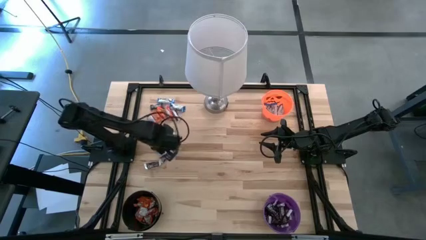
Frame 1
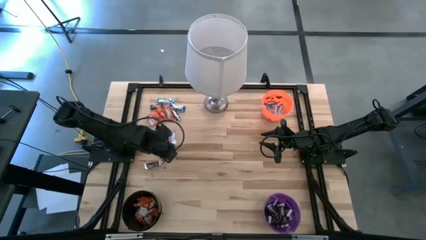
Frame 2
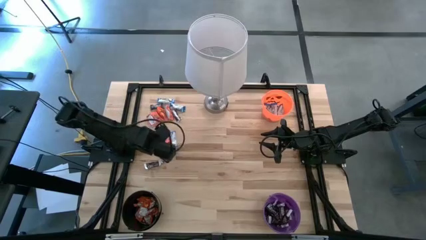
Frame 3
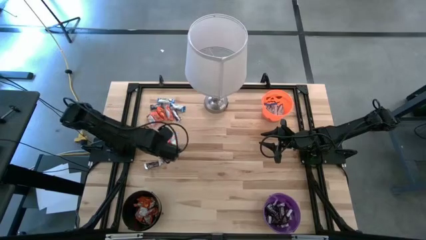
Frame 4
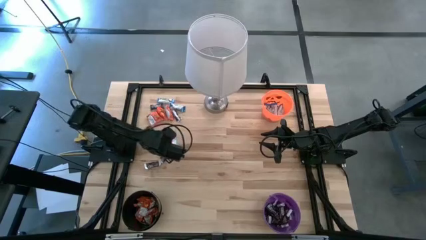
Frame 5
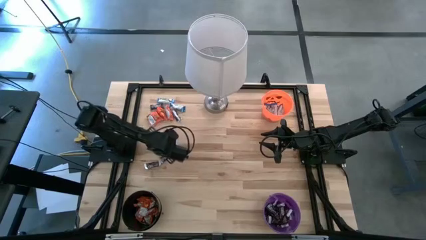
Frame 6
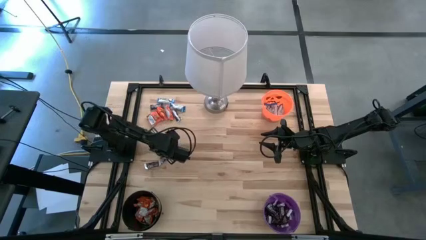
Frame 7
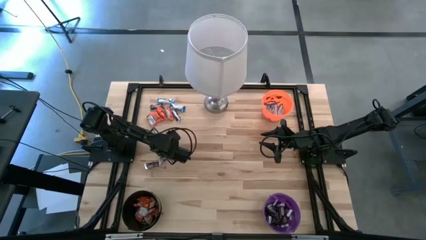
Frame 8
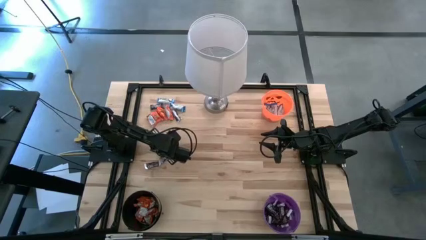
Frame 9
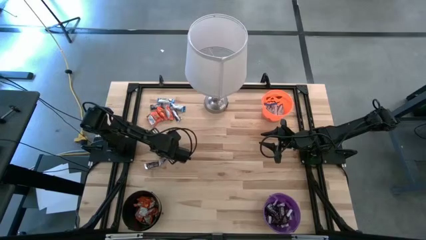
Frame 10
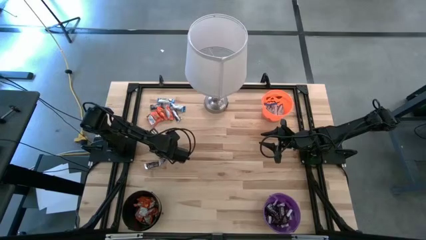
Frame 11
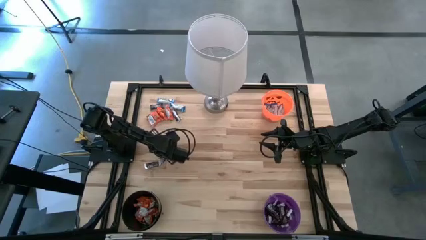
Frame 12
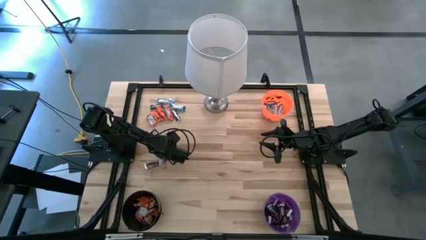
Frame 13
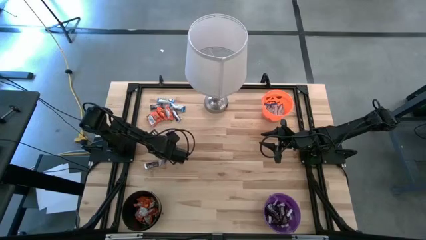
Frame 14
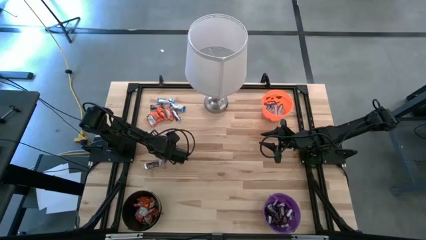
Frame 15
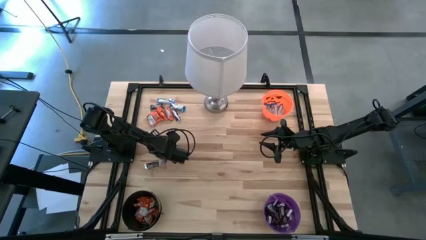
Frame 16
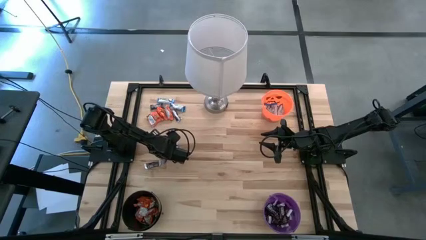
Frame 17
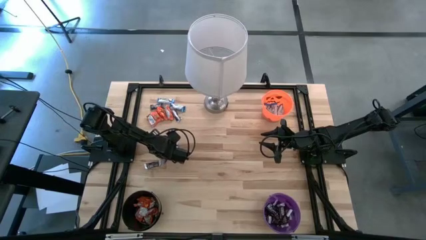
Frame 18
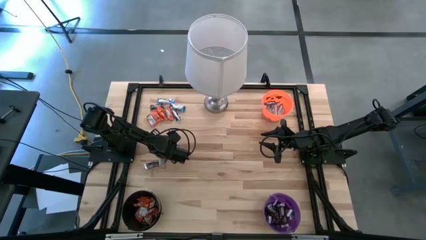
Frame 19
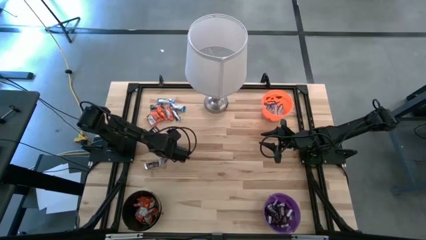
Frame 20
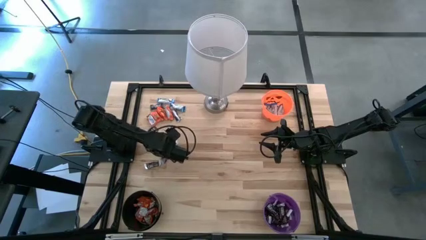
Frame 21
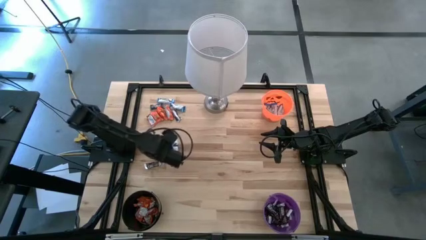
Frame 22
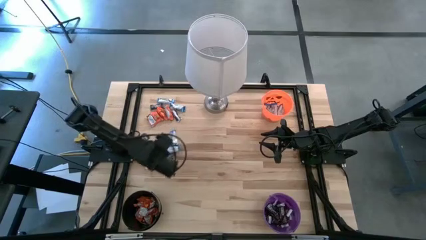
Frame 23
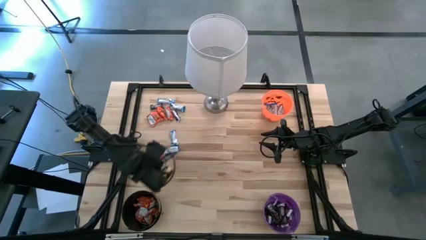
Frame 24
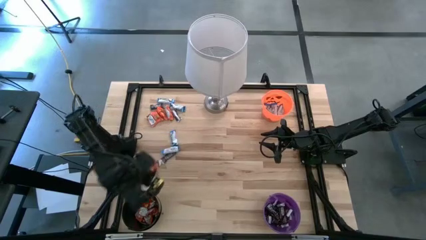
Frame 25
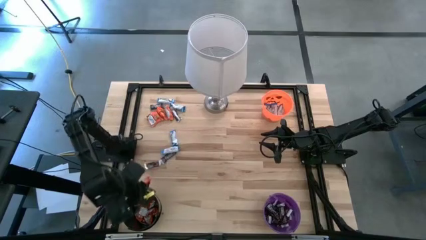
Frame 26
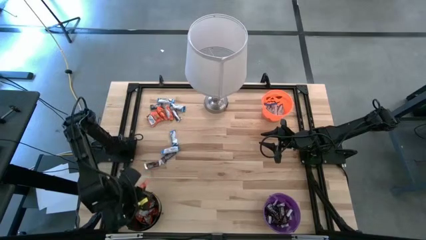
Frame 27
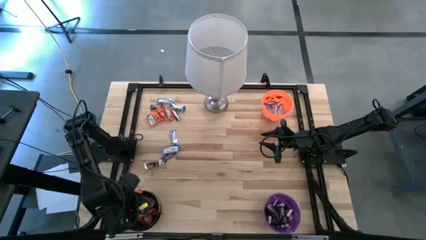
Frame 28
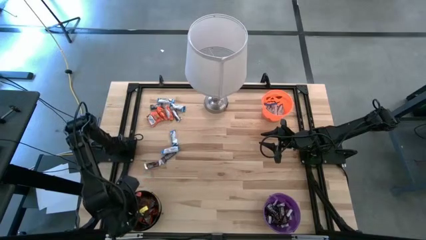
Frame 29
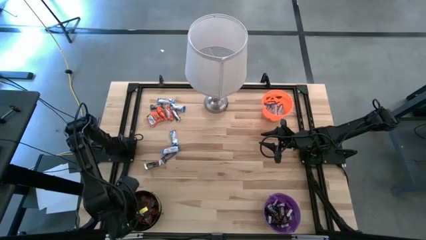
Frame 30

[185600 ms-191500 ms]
Task: Sort candy
Put the orange chocolate bar into the black bucket

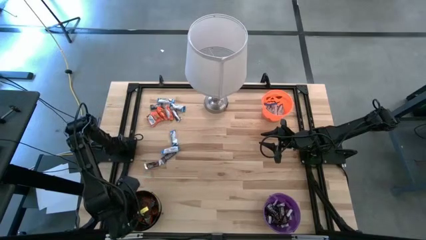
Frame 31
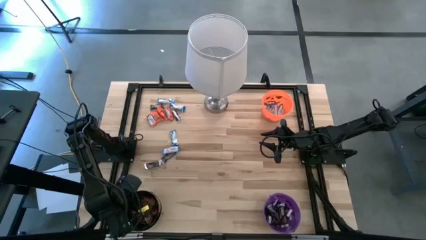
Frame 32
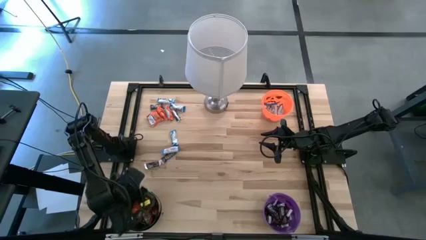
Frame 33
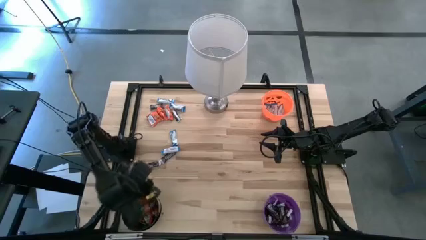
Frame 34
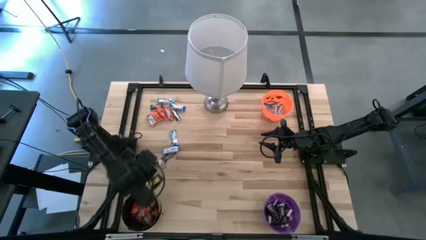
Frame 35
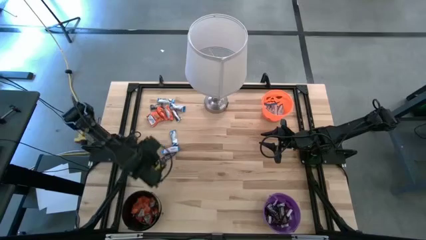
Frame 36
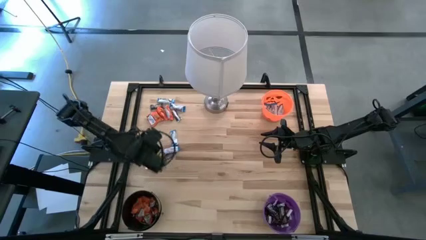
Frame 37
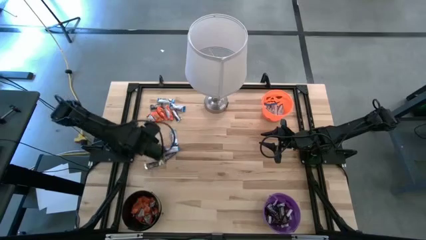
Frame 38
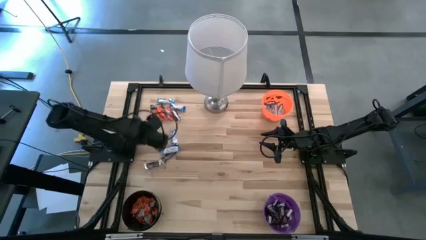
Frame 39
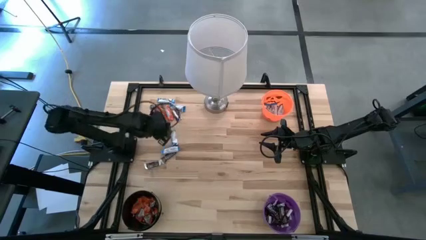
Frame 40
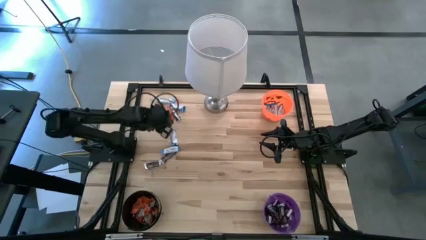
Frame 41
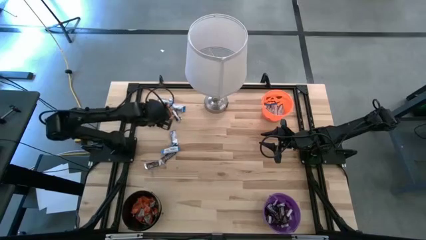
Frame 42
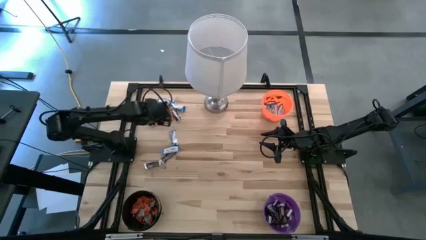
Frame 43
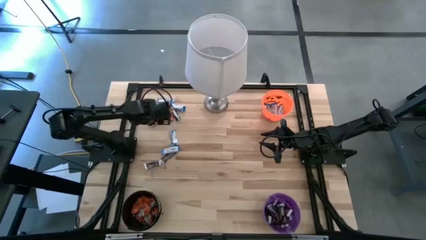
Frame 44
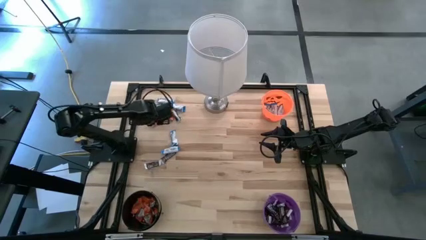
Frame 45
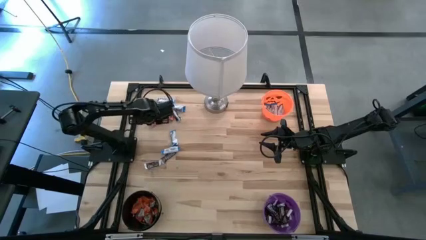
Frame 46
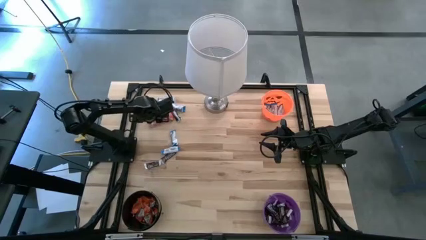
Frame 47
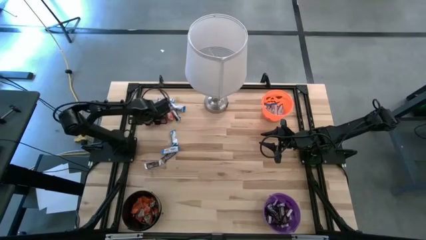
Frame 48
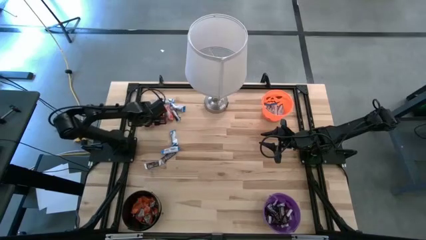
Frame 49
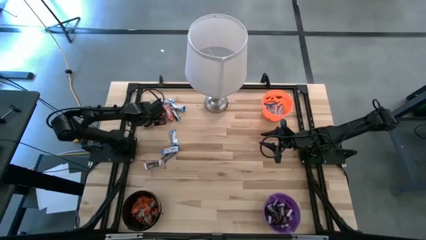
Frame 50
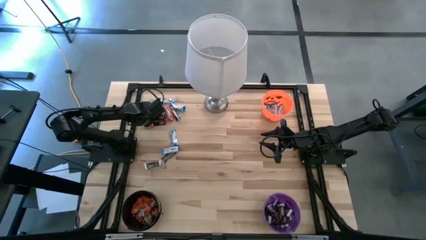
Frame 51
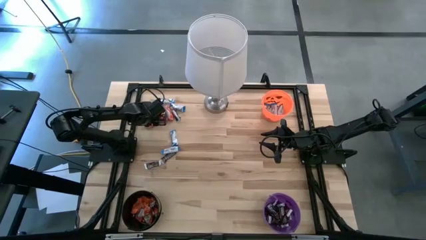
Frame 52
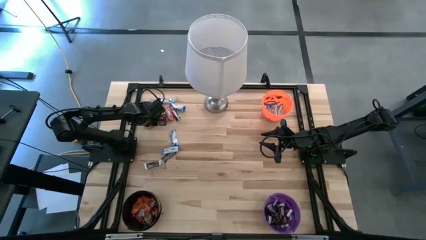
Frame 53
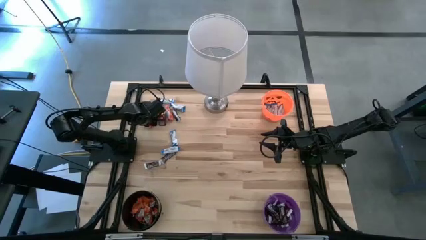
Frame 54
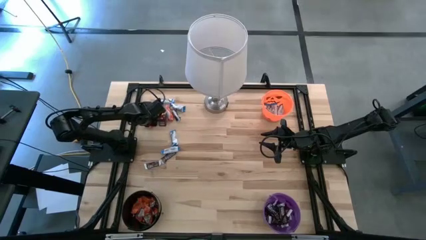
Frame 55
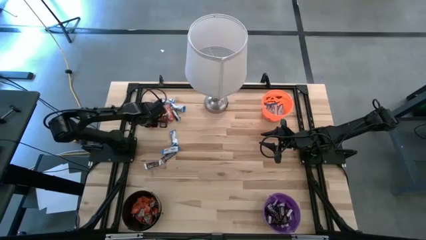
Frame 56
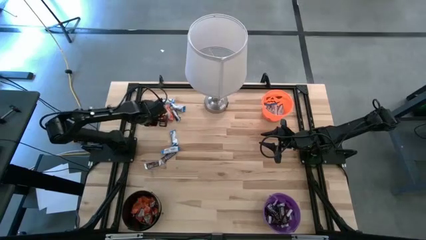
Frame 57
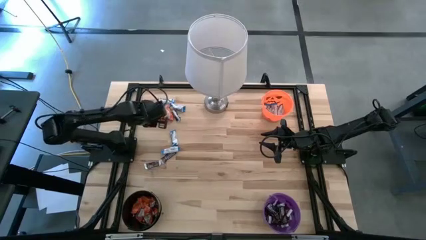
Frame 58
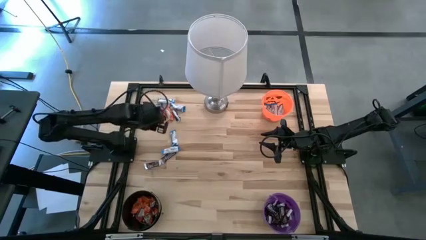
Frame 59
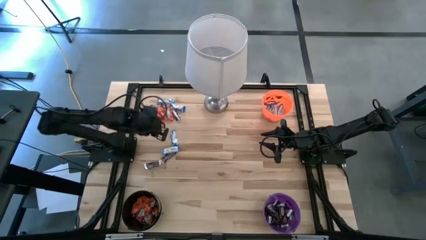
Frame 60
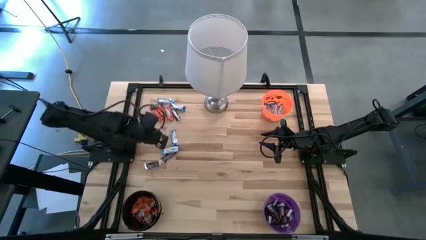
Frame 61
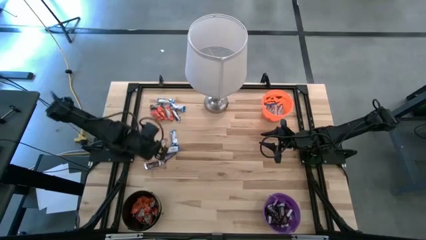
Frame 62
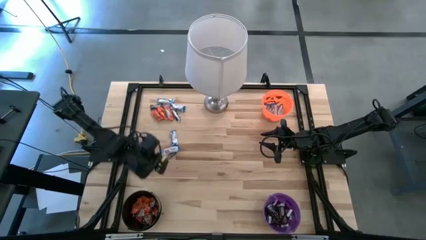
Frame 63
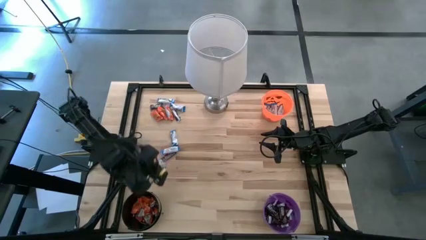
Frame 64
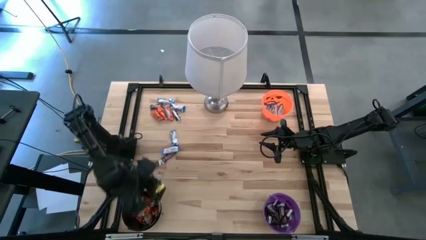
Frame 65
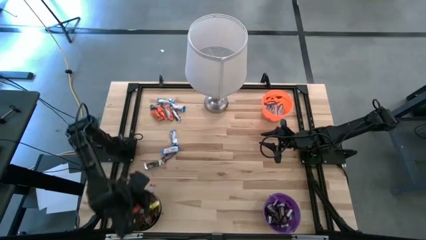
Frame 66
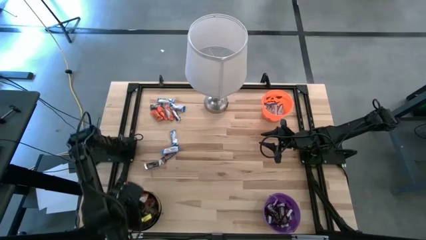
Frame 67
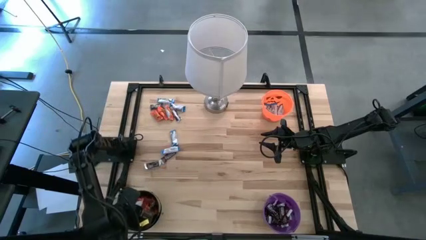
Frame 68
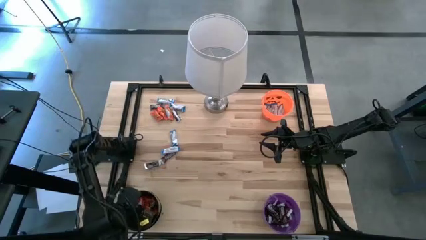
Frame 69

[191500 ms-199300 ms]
Put the orange chocolate bar into the black bucket

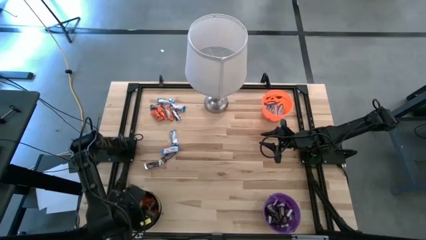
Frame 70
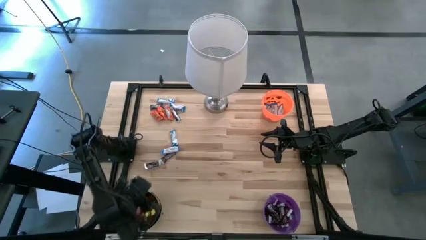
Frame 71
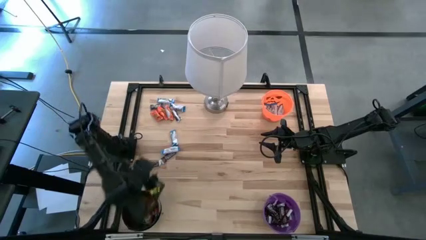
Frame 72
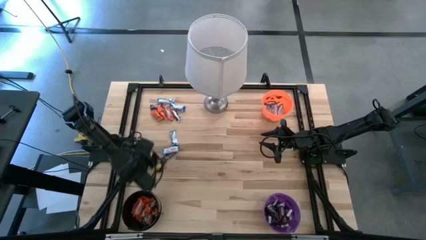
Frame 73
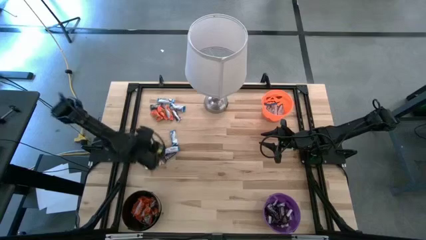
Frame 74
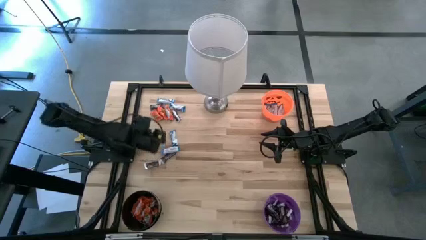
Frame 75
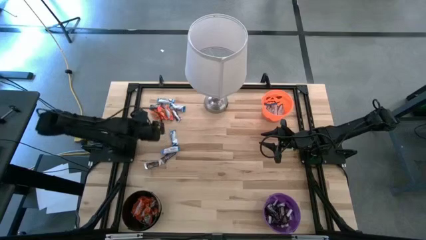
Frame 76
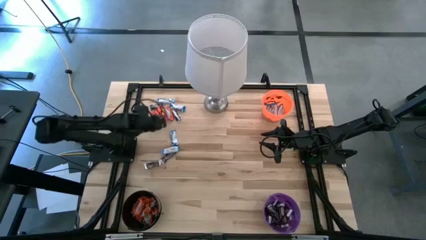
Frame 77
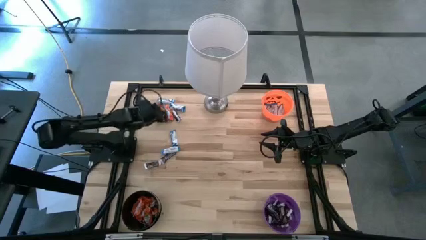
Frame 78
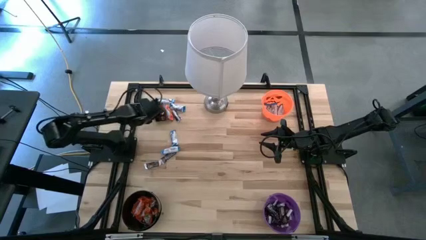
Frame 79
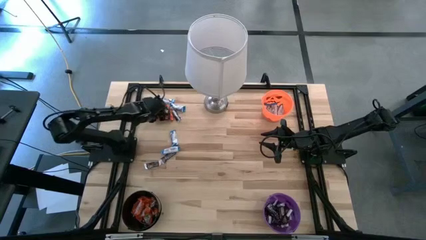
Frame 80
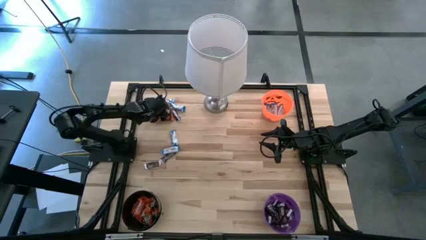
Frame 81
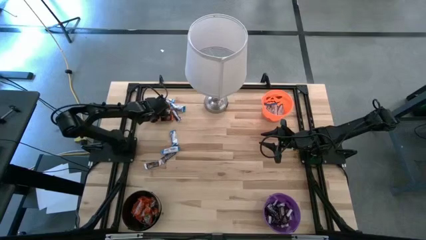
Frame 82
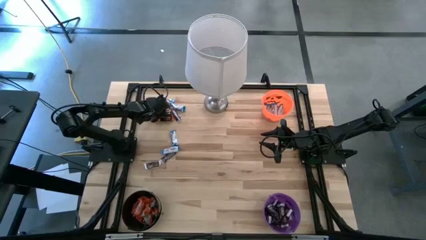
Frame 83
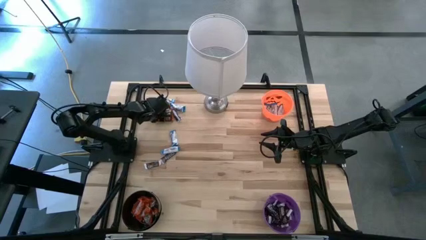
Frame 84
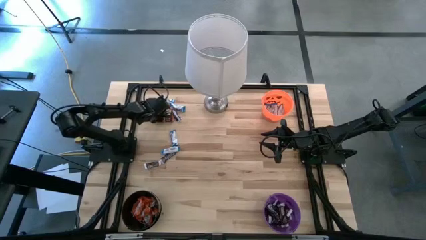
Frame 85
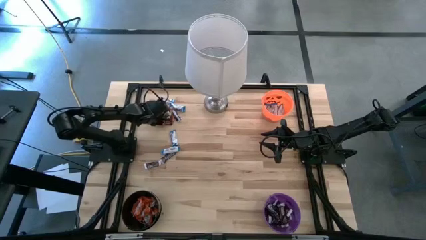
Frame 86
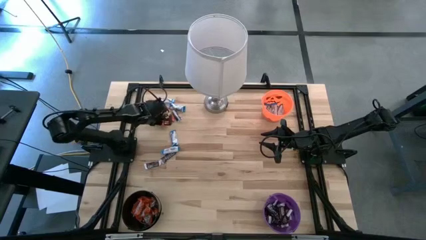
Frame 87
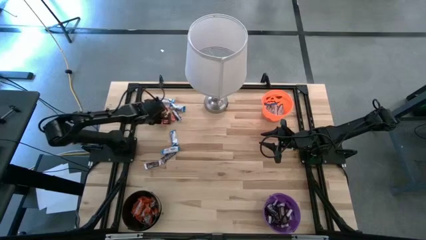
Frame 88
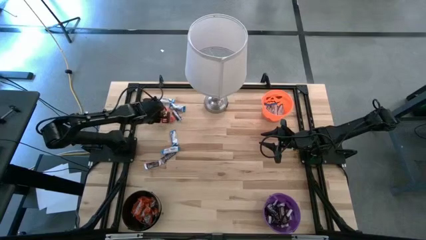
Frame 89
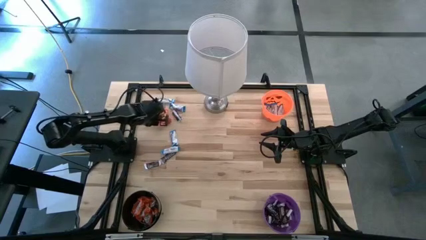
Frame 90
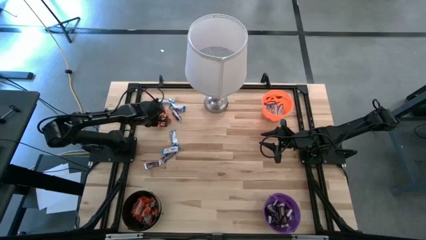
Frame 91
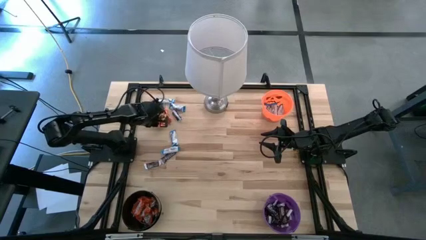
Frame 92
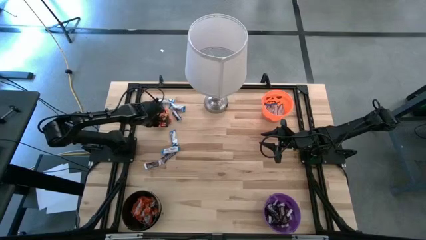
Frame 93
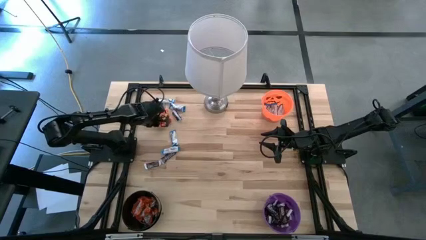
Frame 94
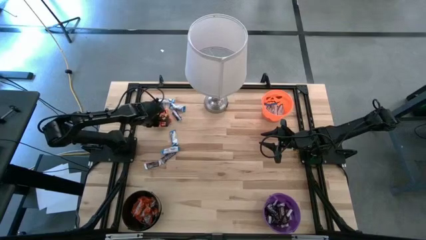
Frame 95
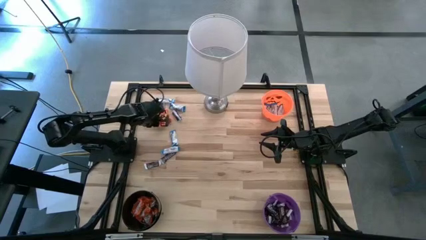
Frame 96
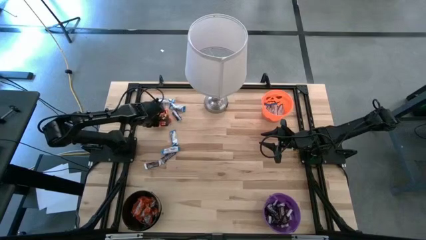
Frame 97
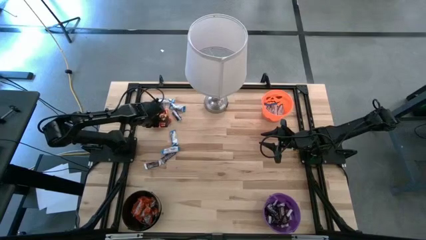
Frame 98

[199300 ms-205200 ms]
Put the orange chocolate bar into the black bucket
